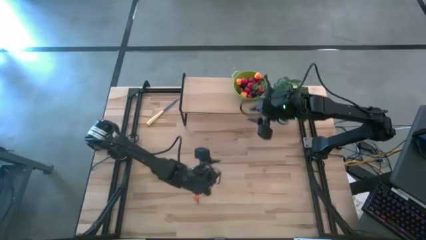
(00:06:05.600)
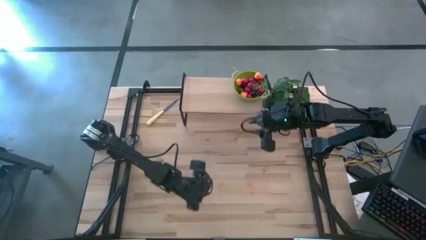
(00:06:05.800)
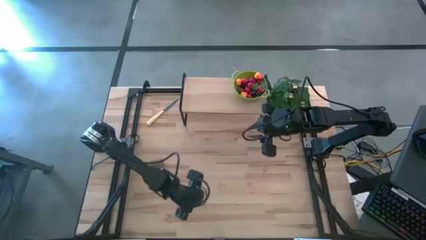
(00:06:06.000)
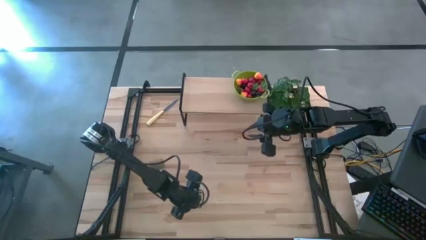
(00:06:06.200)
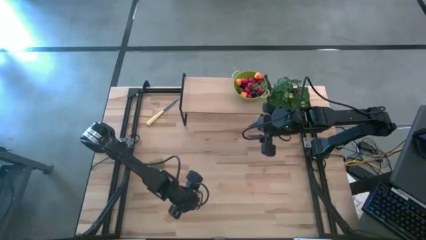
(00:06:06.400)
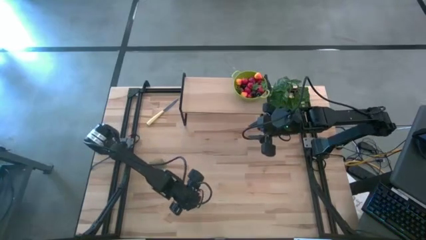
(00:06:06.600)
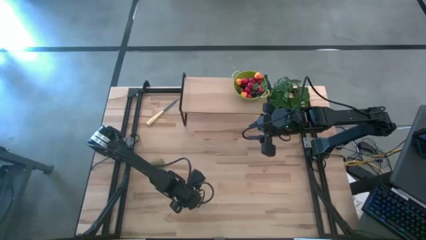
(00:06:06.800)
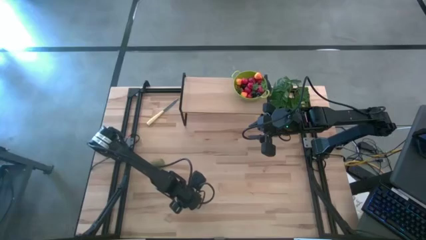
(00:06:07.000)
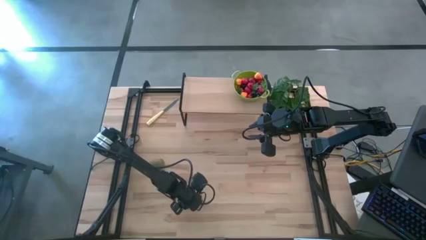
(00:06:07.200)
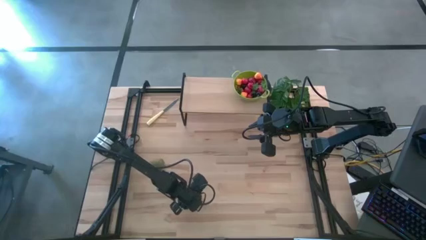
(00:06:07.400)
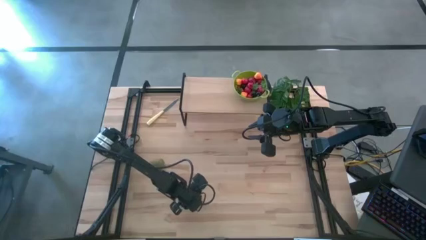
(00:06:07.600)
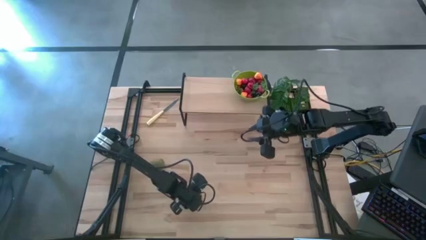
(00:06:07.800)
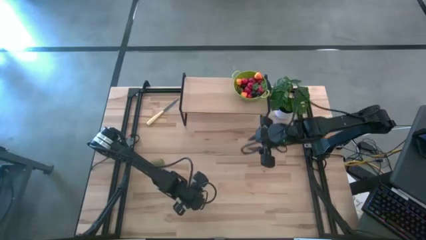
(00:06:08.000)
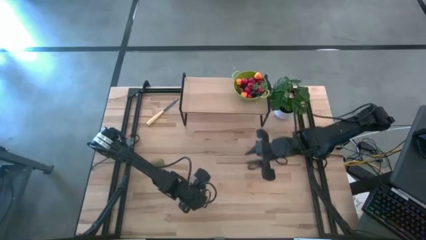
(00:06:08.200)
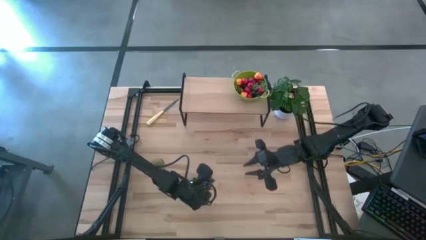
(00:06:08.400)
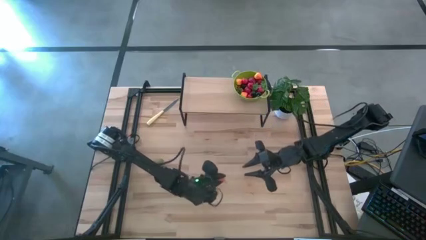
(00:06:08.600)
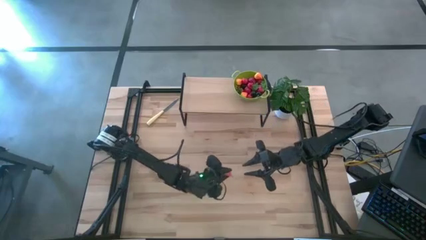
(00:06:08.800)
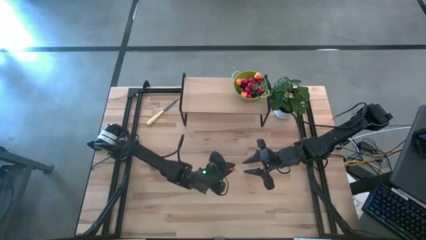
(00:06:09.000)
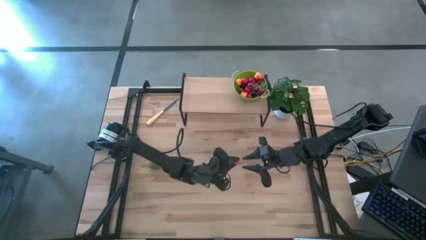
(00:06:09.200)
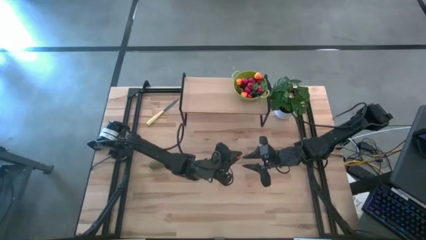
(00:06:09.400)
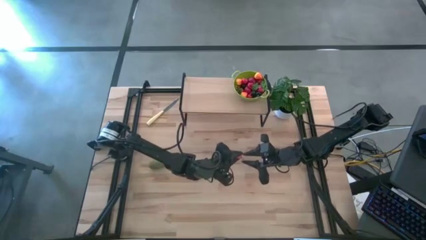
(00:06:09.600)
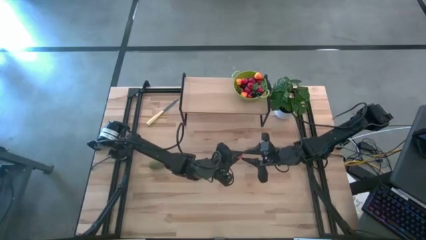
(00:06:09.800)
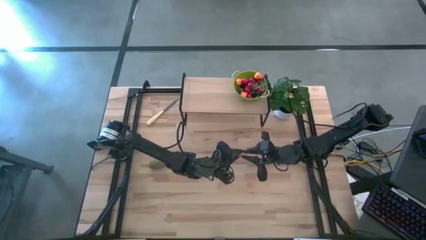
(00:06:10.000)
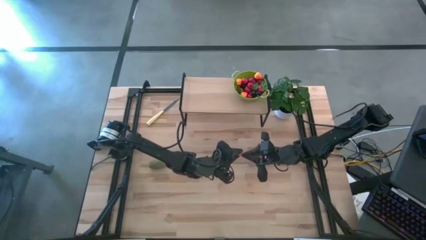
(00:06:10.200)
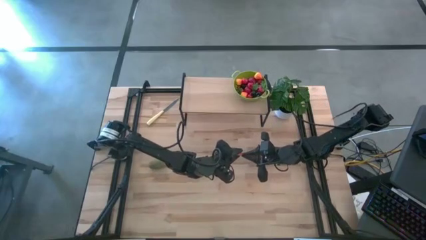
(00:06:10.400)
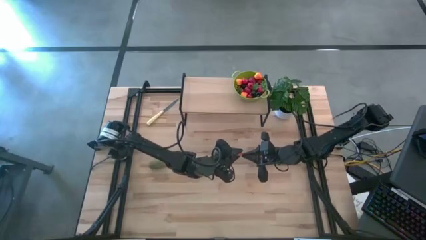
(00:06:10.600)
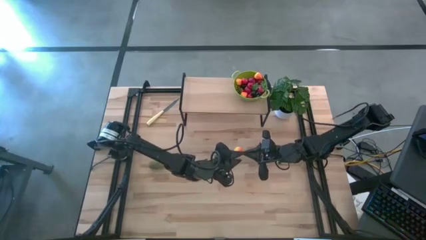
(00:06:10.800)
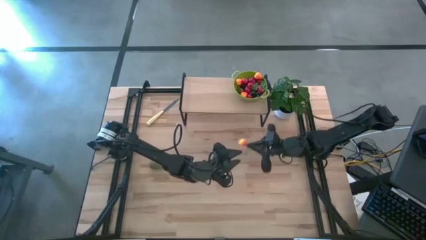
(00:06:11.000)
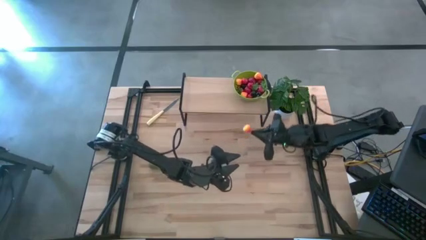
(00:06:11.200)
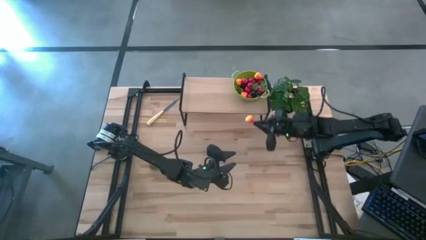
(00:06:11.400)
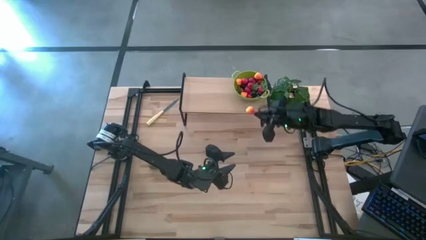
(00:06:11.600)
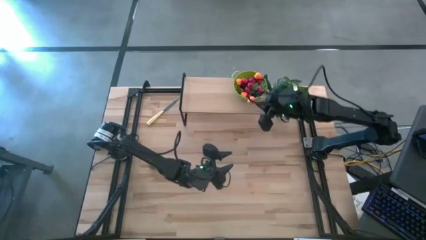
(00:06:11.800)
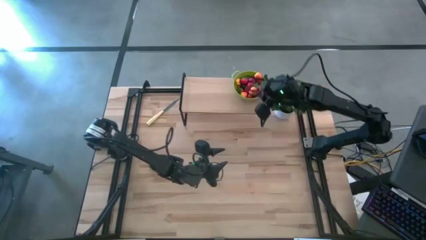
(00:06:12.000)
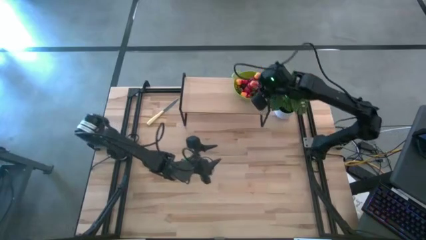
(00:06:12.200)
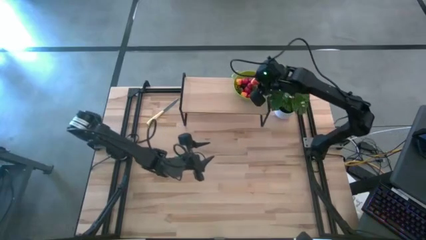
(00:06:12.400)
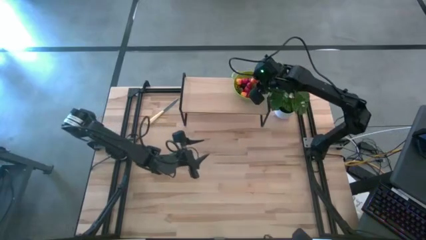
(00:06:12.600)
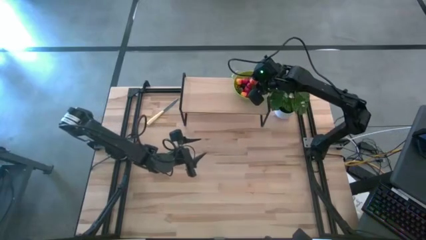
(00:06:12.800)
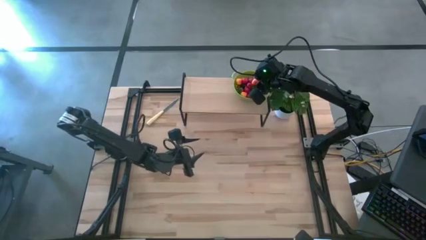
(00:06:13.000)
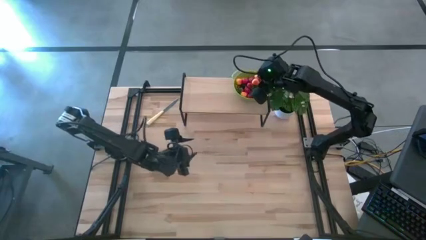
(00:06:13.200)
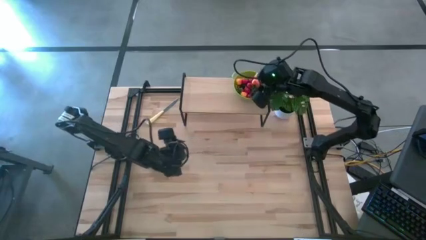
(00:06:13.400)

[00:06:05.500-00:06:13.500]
Task: Build produce basket
Put the pear into the green basket

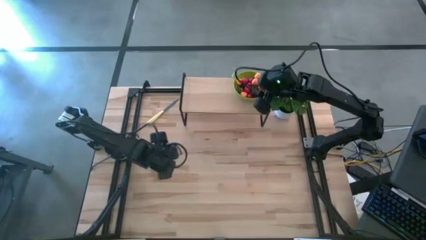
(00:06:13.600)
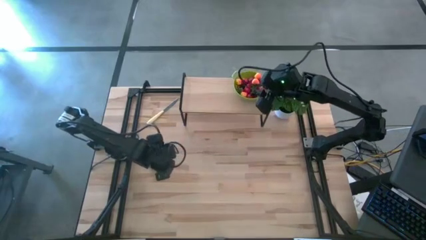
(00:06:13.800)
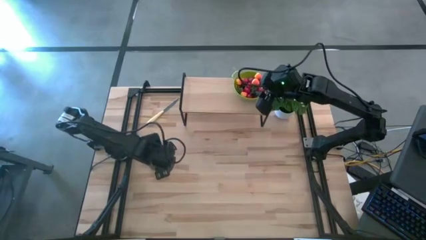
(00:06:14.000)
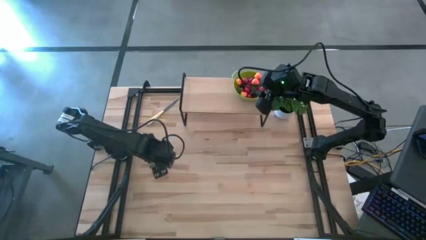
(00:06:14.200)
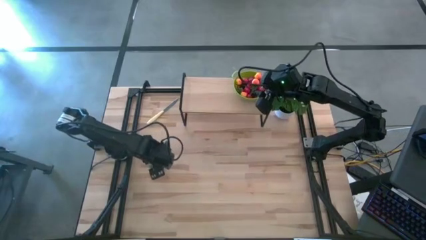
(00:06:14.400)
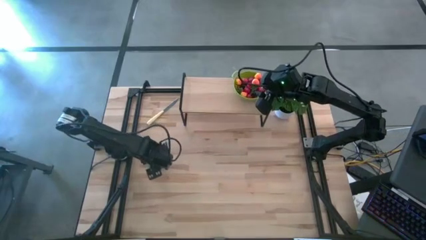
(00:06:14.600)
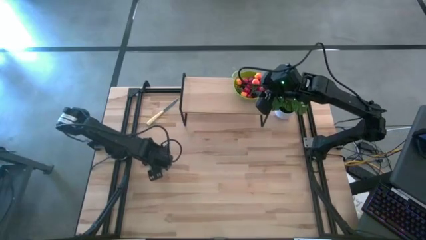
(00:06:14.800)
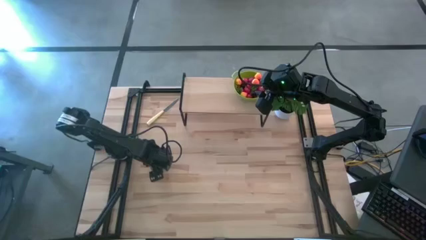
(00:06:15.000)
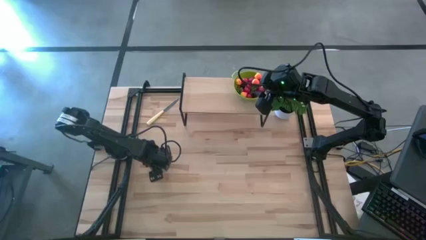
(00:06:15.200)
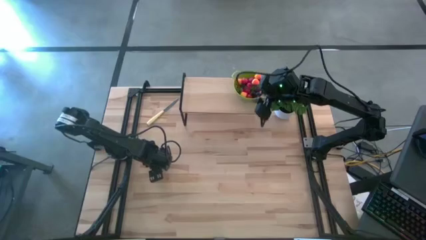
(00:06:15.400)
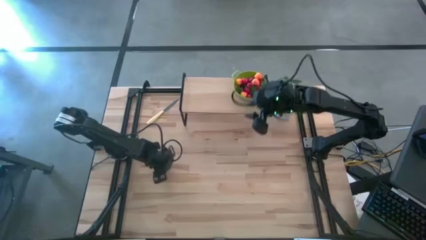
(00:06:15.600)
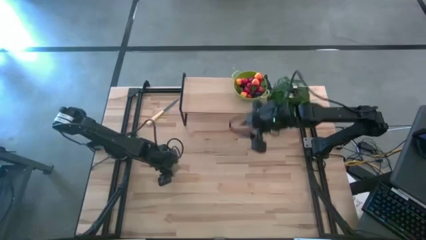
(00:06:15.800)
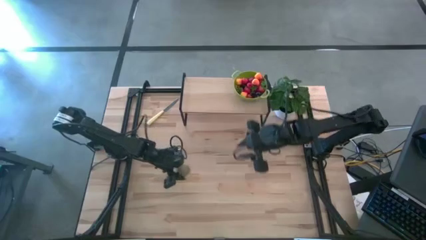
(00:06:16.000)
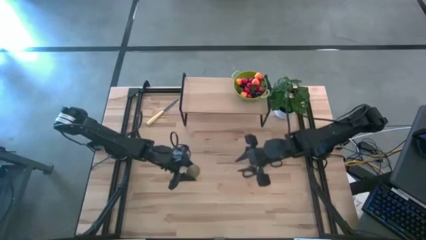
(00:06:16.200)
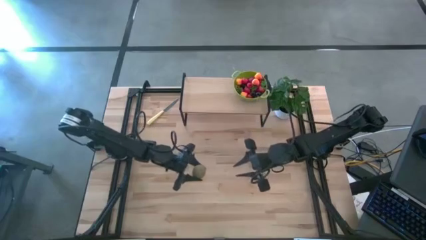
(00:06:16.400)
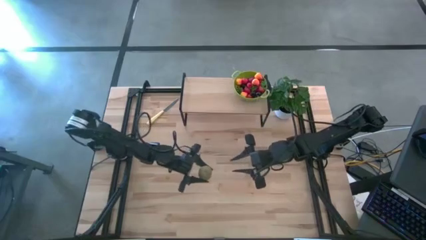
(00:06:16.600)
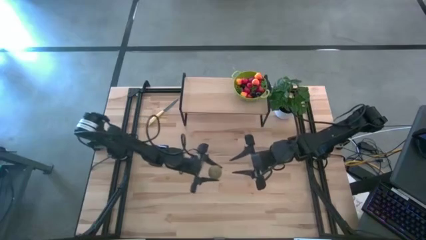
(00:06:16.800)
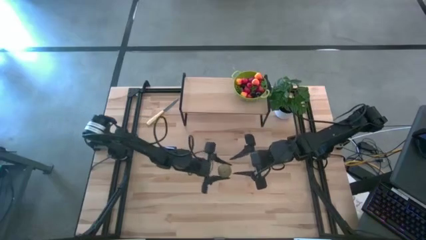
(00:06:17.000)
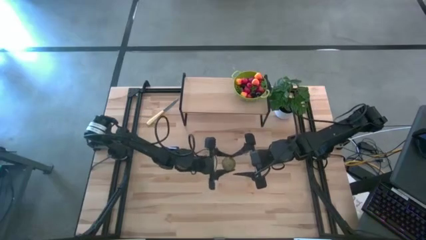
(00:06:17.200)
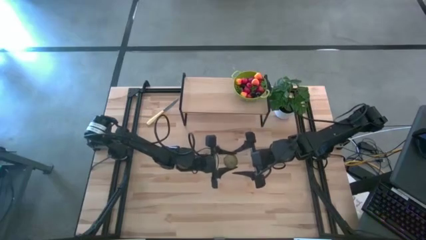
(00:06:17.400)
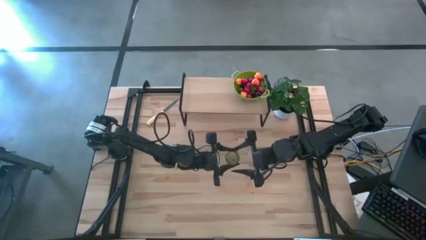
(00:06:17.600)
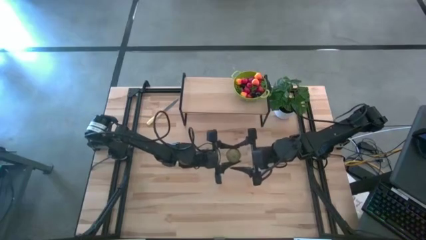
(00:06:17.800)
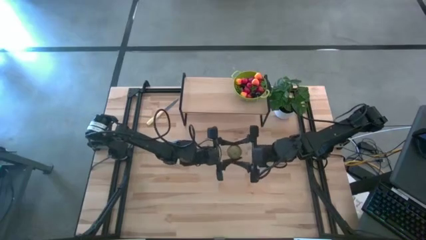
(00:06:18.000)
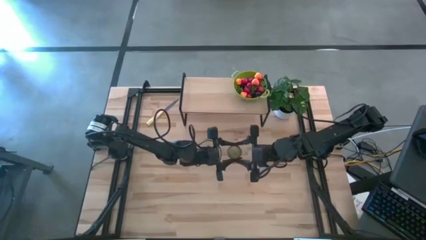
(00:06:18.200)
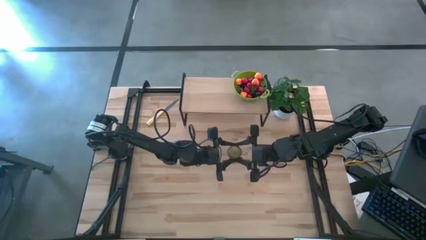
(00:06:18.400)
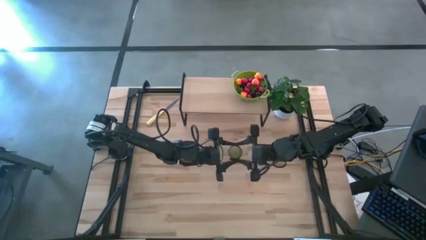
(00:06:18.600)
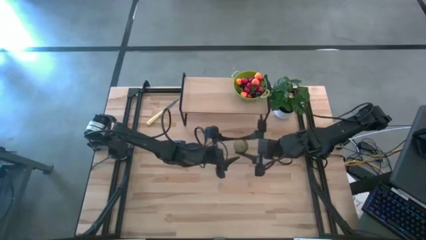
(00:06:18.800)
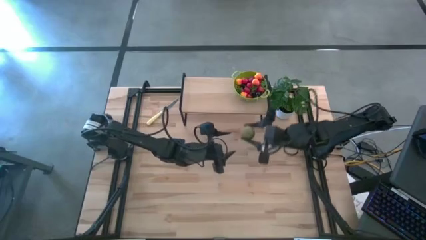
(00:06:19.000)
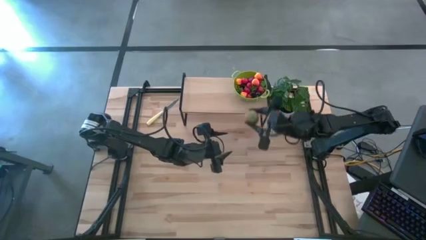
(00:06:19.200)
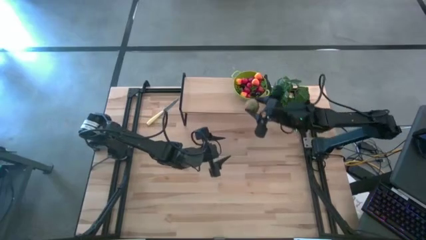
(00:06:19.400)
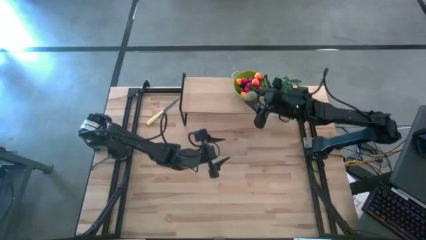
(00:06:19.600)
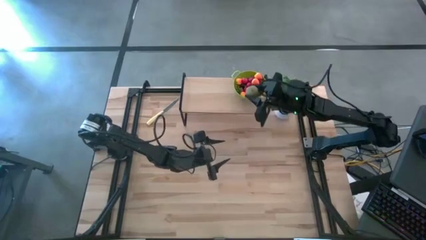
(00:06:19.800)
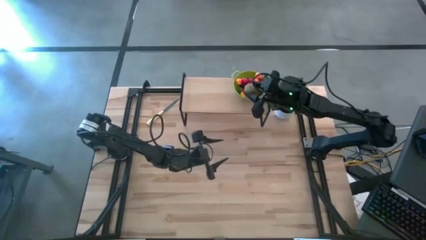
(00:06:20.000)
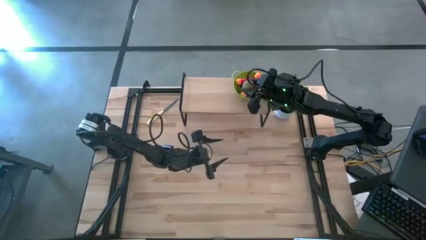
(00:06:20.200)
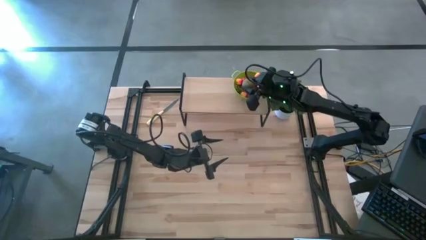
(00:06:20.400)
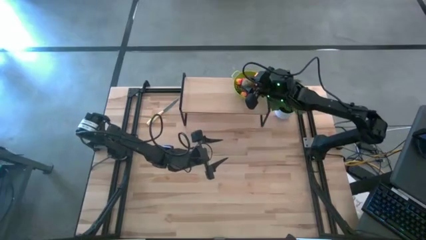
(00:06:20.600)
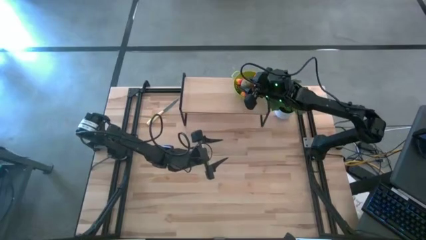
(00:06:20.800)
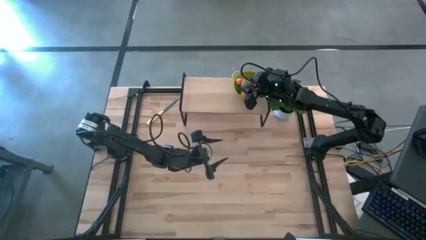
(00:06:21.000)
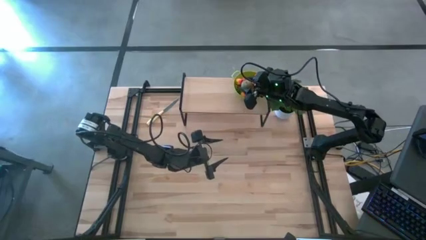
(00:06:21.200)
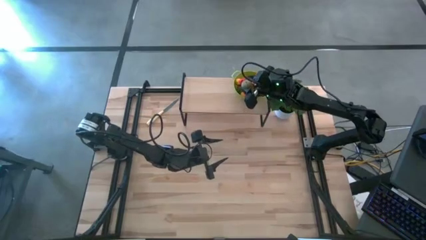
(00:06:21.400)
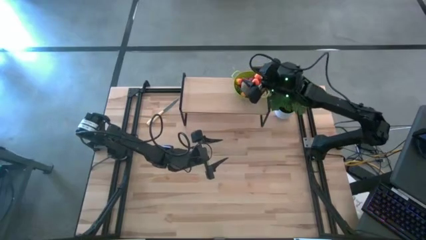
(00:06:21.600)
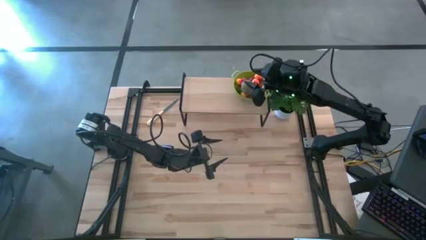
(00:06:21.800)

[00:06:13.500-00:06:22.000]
Put the kiwi into the green basket
